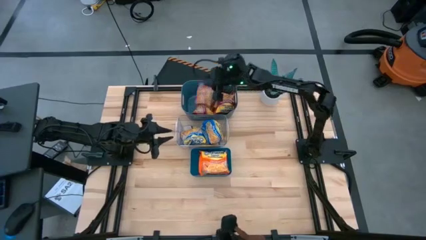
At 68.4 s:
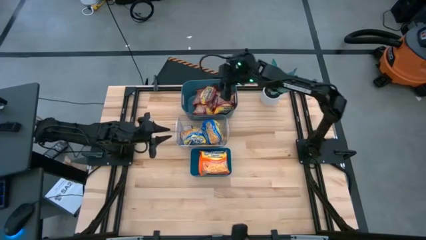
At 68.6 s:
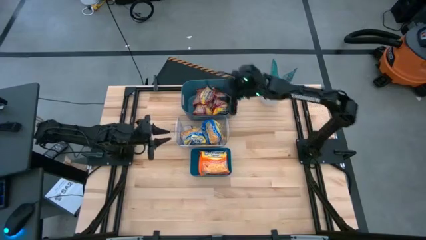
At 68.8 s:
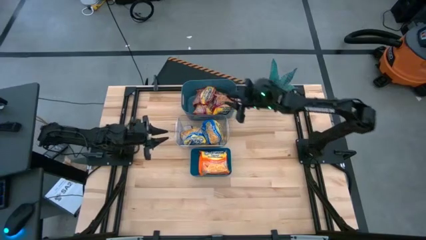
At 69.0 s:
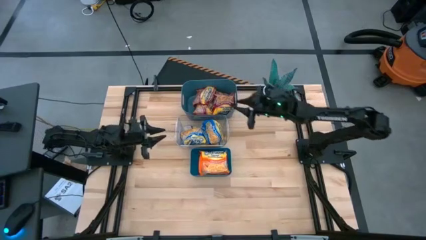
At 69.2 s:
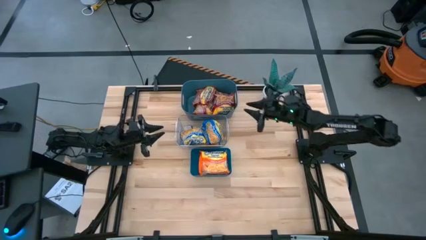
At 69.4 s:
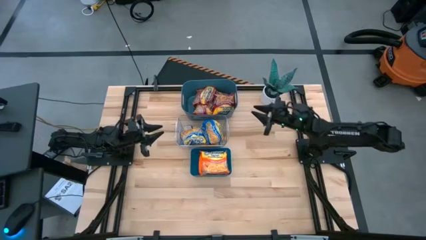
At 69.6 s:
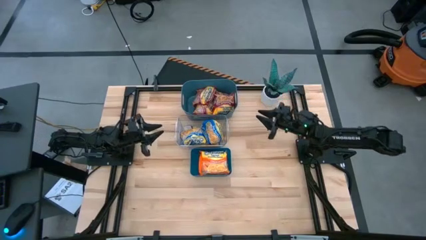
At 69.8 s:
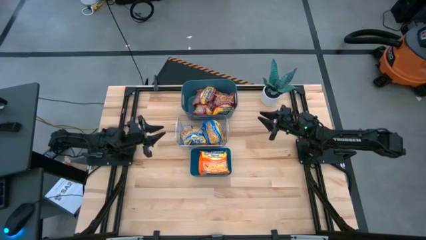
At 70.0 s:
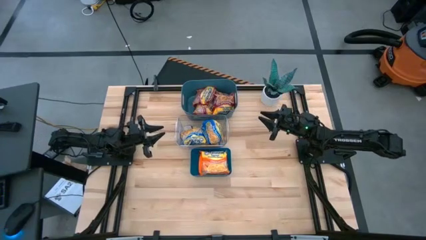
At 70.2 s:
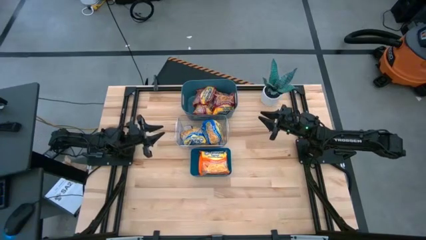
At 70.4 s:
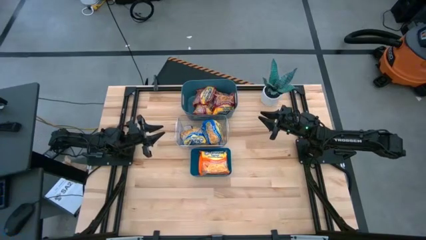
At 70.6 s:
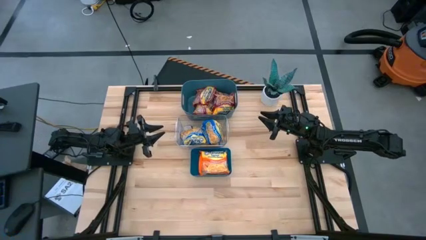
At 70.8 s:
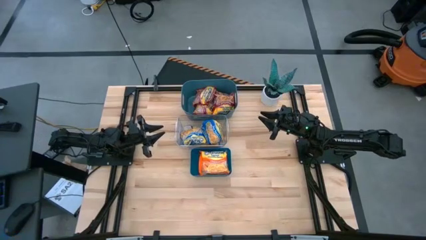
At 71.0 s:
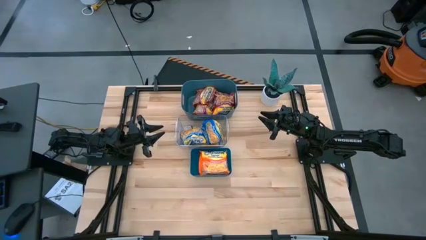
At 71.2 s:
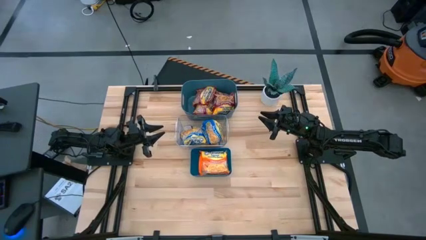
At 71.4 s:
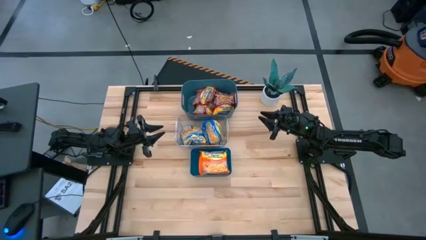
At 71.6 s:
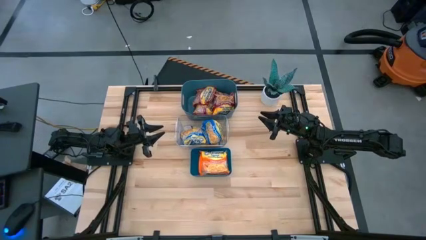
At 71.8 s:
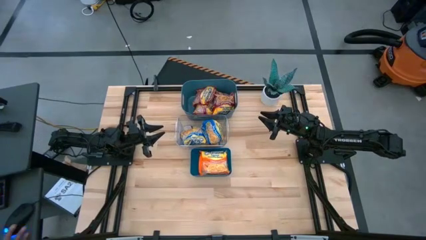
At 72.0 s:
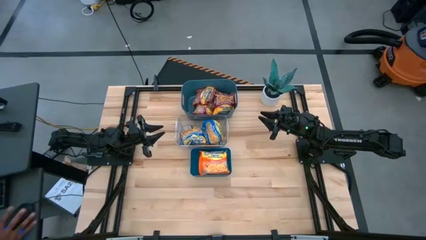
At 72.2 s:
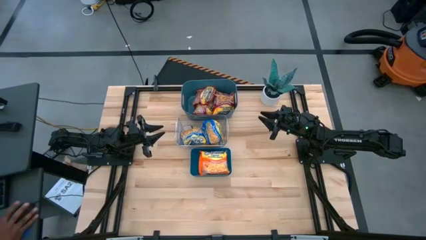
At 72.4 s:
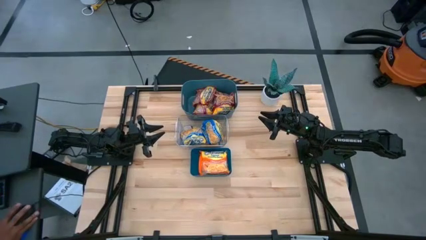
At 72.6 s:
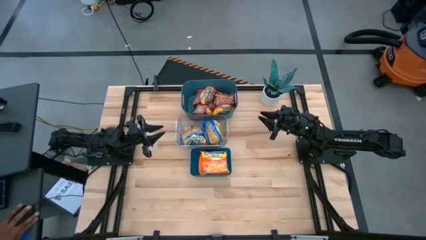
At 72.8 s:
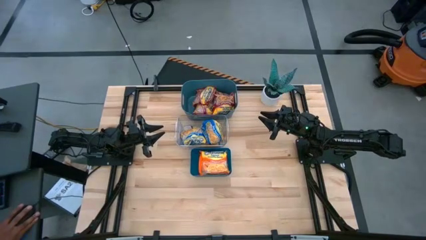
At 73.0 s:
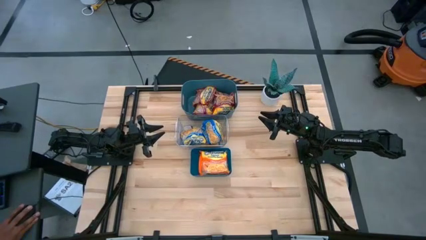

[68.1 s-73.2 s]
Task: Sort Maruchan noodles
Return to Home position

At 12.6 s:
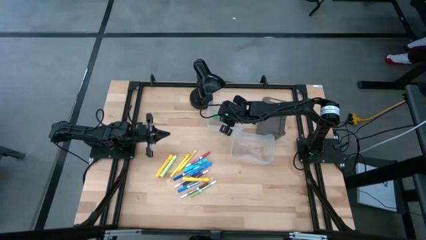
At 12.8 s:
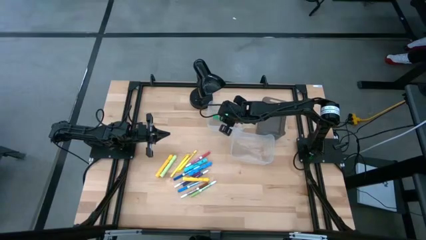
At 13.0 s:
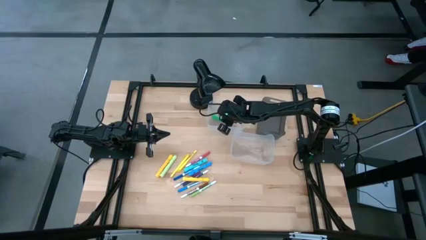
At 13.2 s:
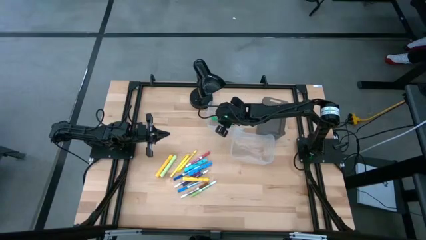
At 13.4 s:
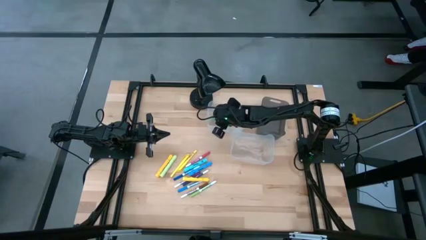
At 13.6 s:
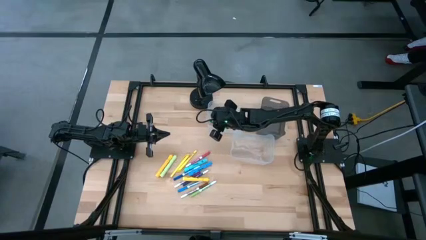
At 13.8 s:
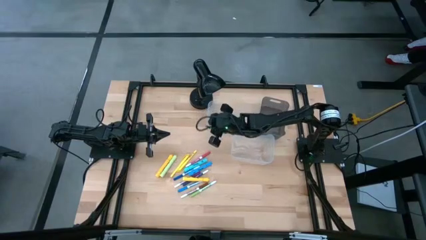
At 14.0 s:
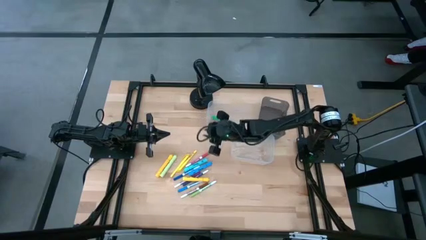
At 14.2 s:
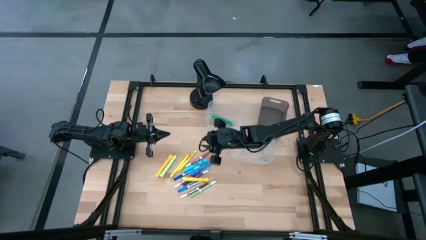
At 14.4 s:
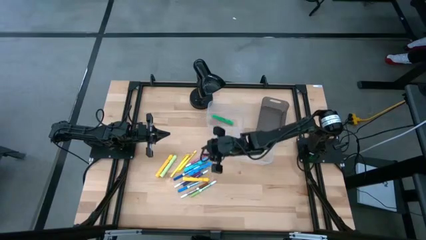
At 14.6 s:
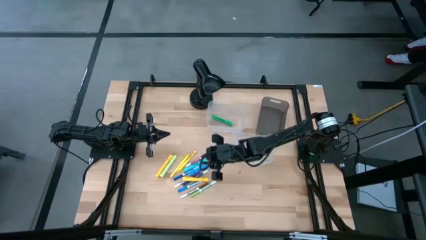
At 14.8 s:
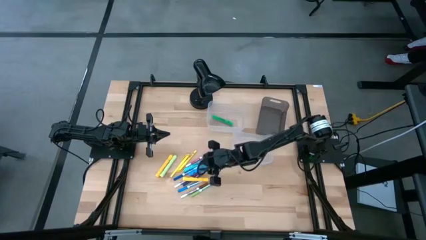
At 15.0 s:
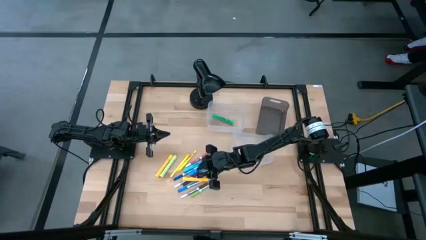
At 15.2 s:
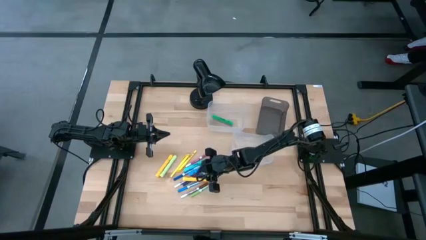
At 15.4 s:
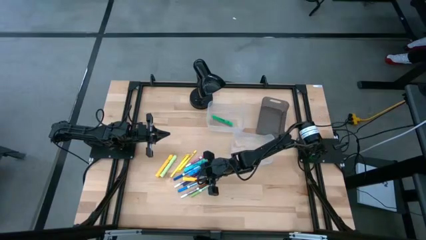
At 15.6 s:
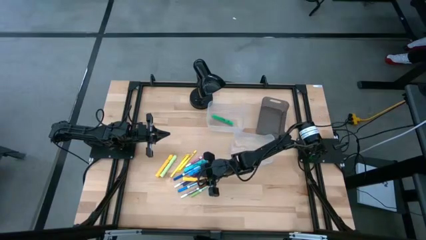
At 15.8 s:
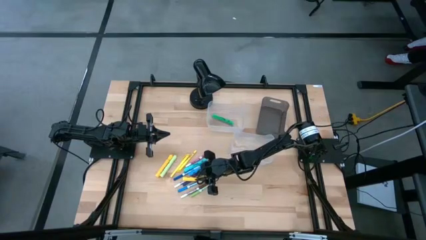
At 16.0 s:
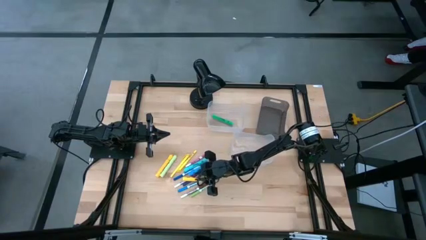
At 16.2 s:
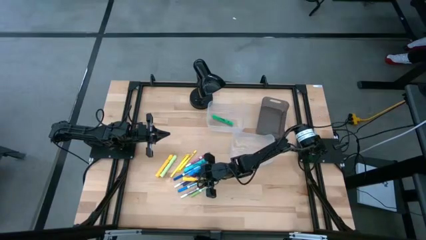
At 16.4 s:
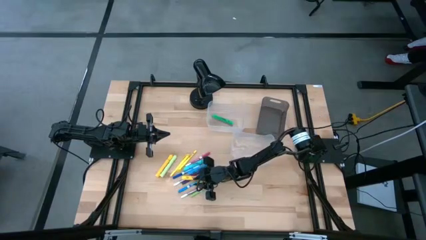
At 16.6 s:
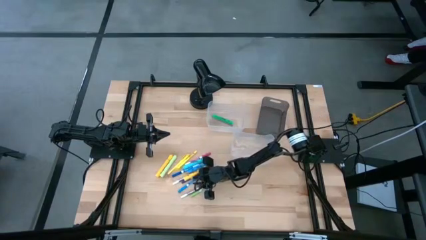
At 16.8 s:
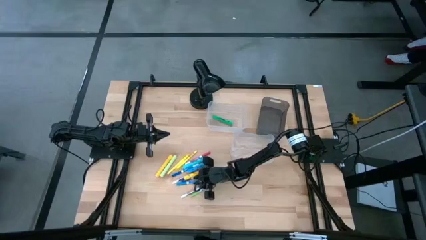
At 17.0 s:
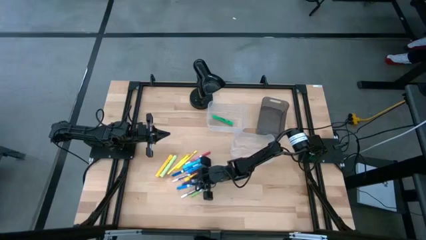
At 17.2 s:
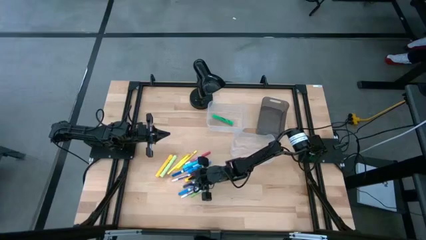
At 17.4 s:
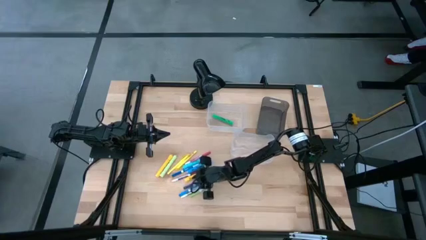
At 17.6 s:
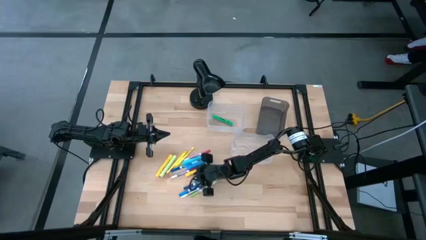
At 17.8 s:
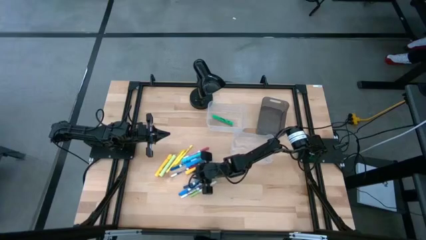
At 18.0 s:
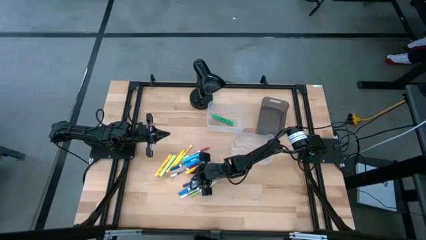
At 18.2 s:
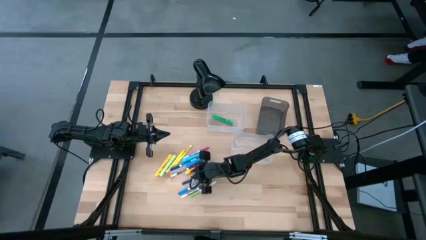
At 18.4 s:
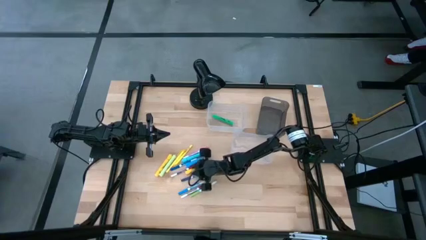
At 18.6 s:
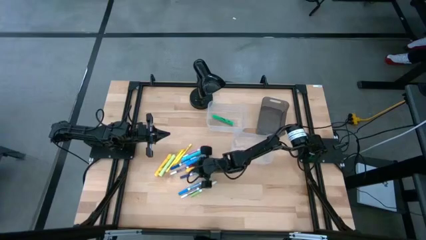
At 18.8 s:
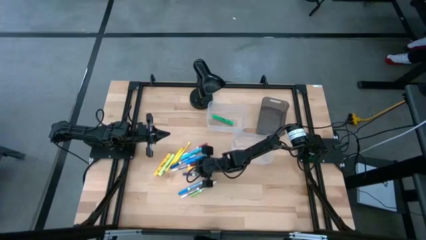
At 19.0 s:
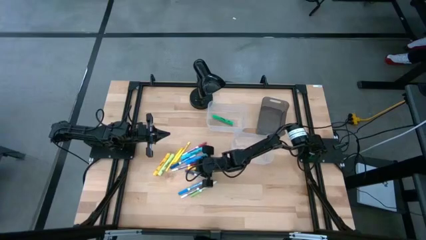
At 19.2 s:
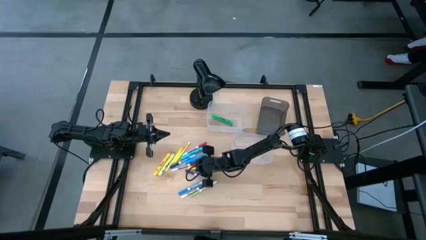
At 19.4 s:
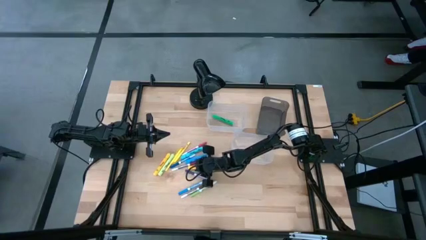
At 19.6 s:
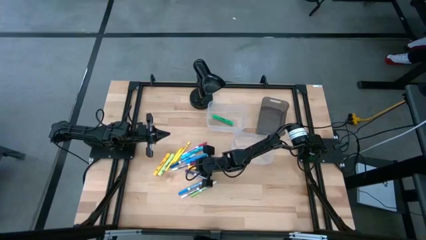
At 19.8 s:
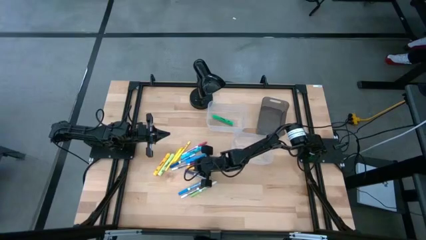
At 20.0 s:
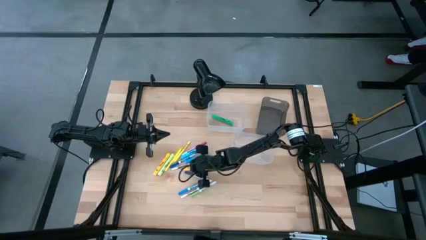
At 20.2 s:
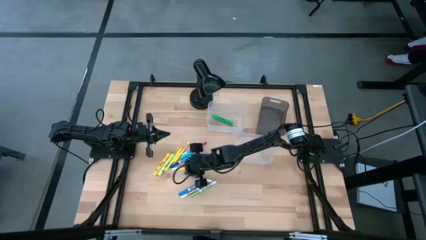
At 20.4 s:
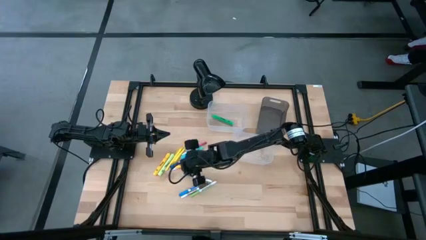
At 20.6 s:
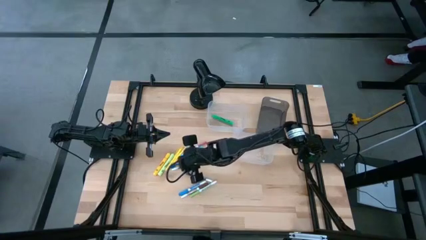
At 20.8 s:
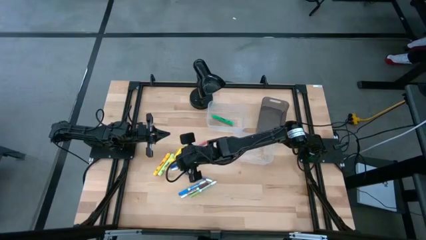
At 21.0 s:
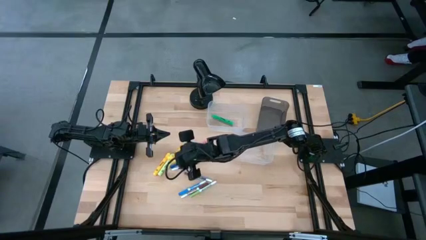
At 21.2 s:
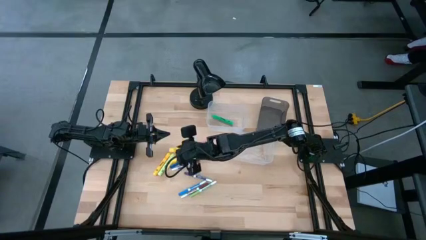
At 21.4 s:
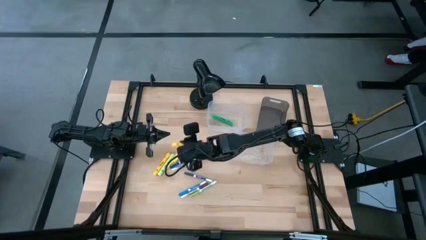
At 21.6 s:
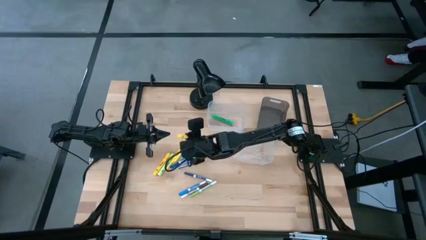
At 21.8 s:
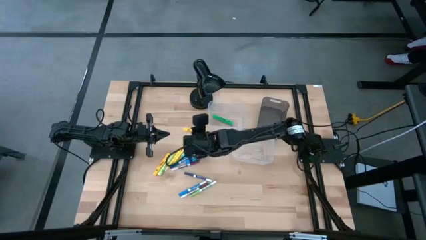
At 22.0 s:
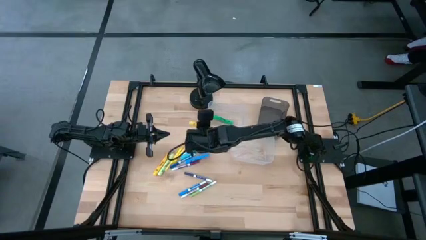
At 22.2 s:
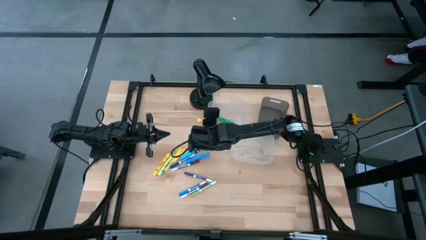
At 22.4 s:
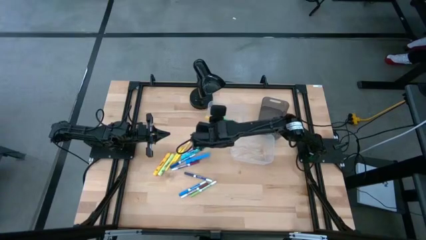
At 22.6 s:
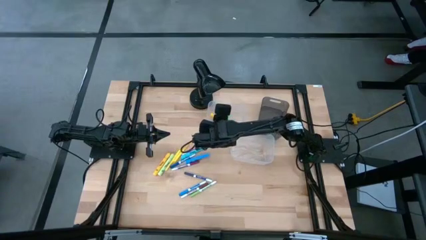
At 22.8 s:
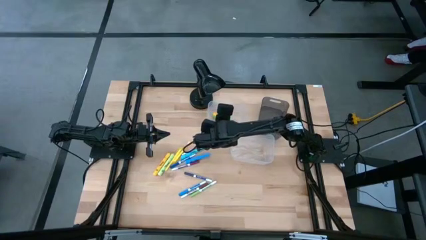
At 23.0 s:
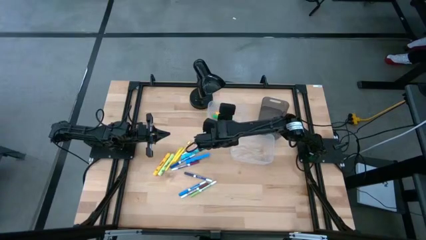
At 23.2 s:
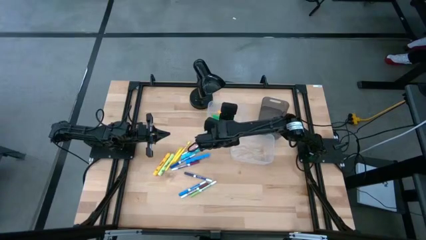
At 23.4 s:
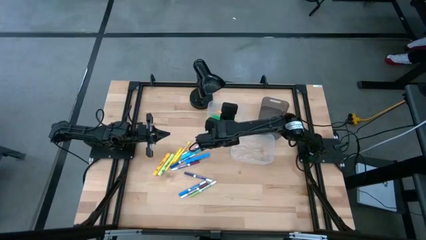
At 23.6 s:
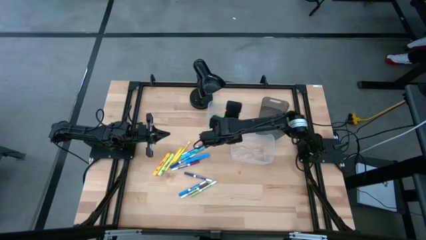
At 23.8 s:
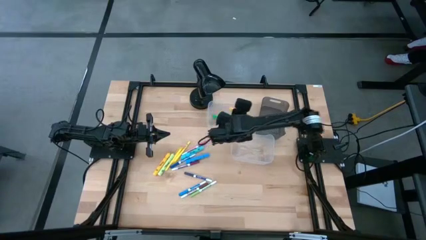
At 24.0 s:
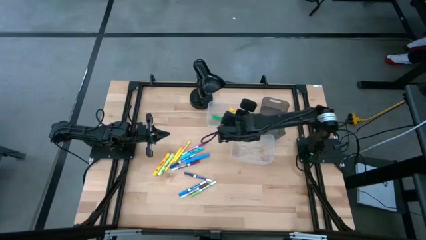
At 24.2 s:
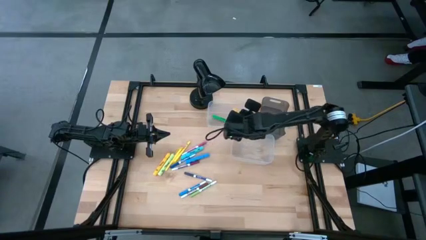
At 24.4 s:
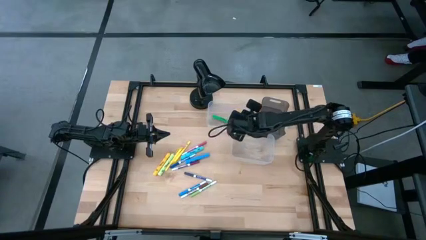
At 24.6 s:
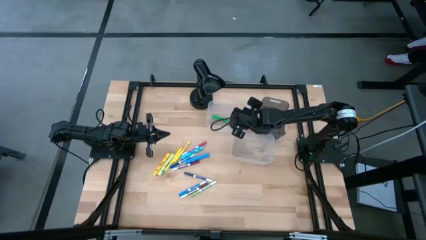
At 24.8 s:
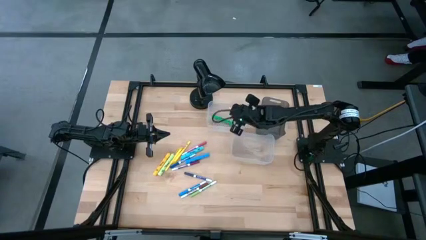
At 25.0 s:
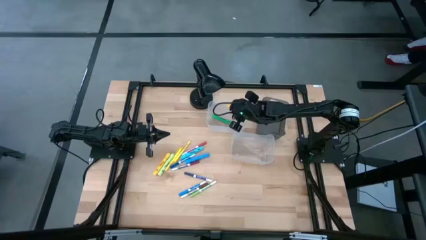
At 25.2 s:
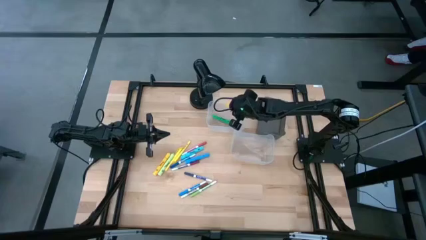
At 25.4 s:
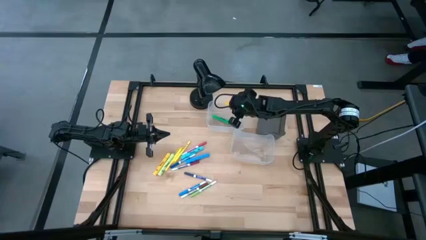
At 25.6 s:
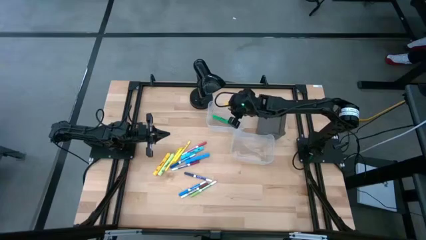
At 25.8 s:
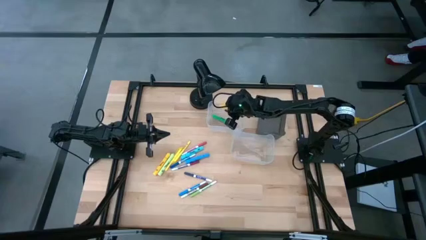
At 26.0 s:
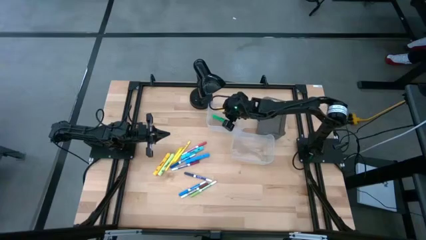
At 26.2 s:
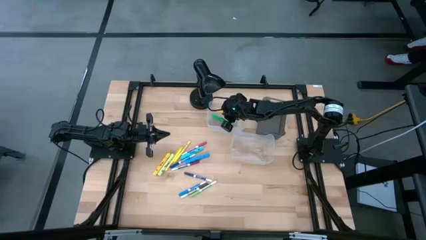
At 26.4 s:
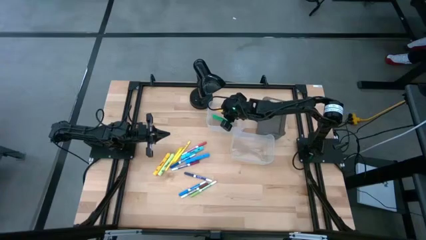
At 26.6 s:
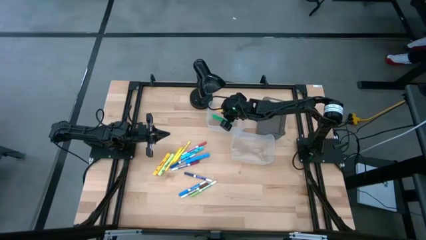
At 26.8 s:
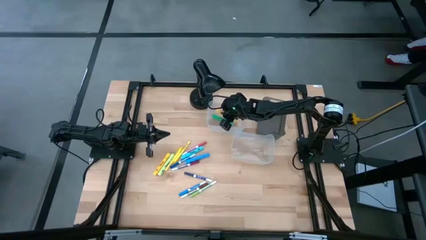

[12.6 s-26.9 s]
Task: Pick & Place Markers
Put the bottom yellow highlighter pen into the top transparent bin
